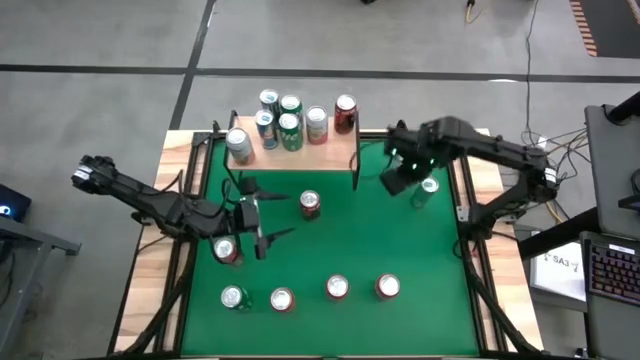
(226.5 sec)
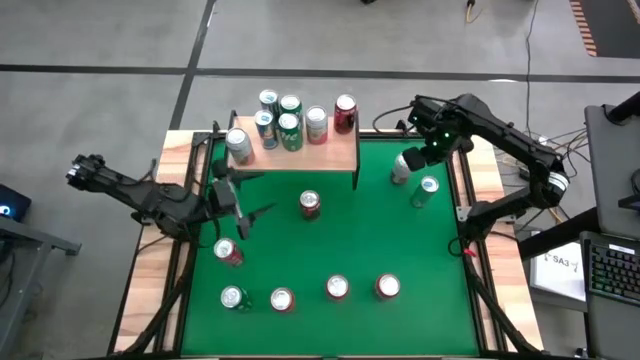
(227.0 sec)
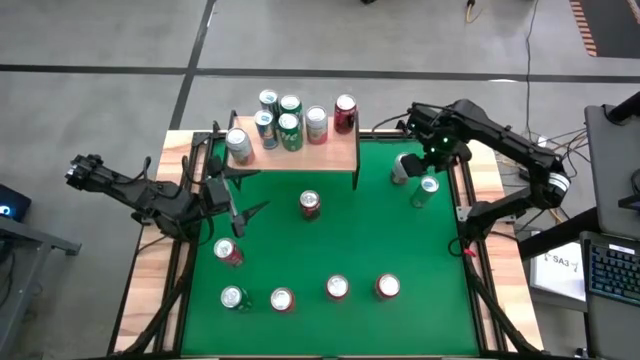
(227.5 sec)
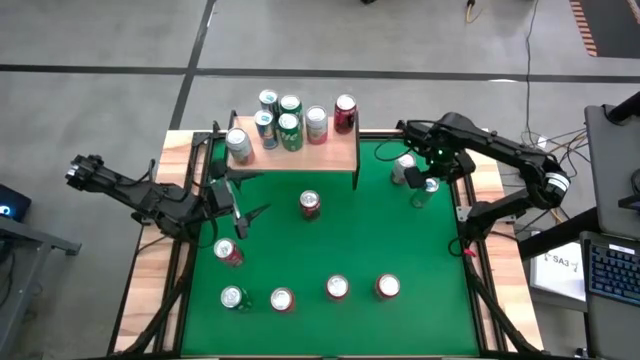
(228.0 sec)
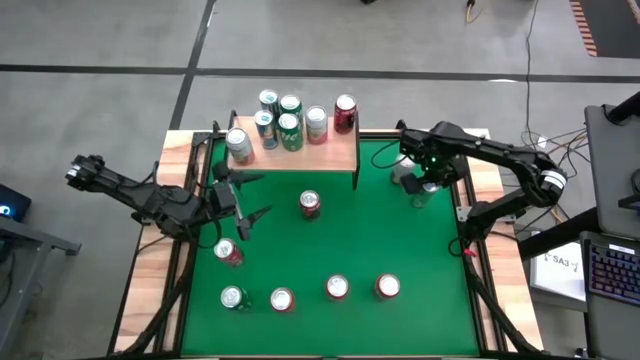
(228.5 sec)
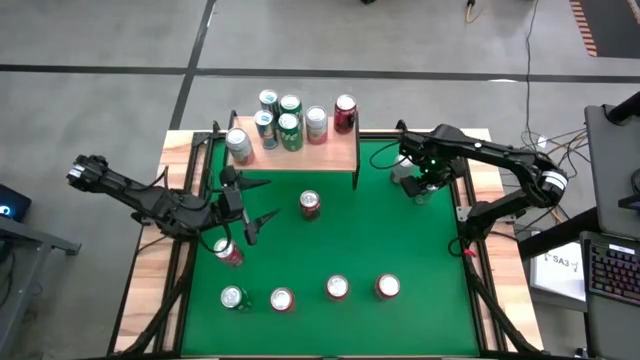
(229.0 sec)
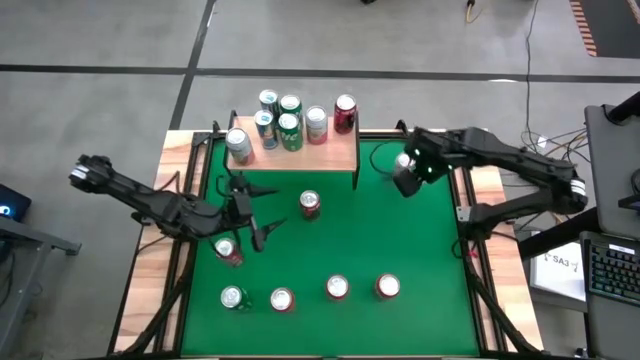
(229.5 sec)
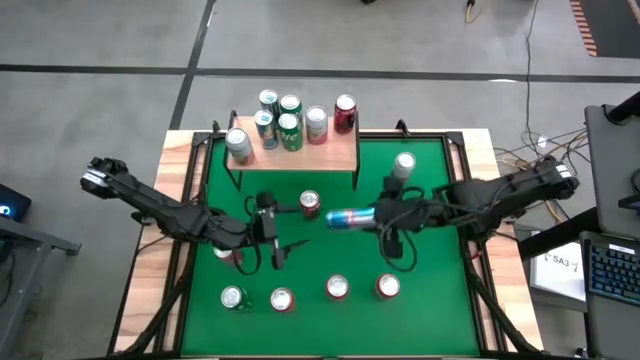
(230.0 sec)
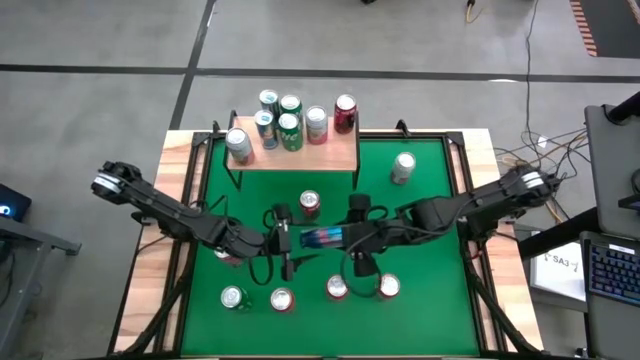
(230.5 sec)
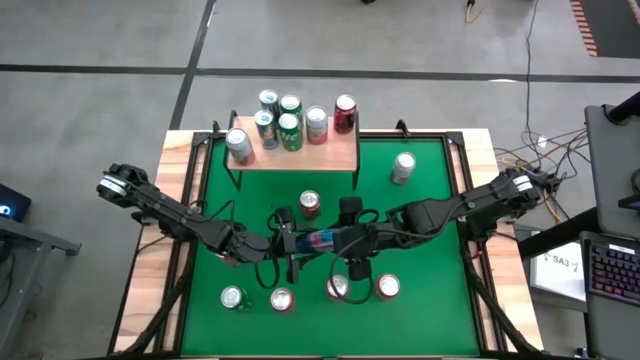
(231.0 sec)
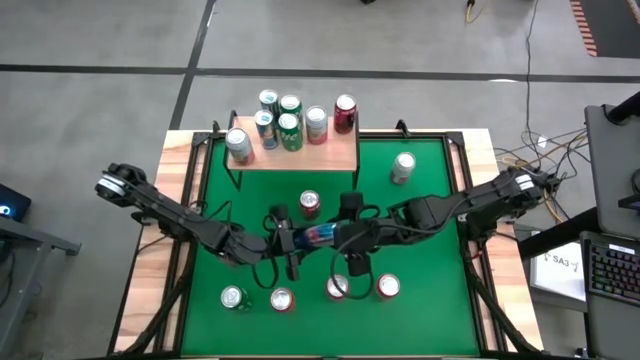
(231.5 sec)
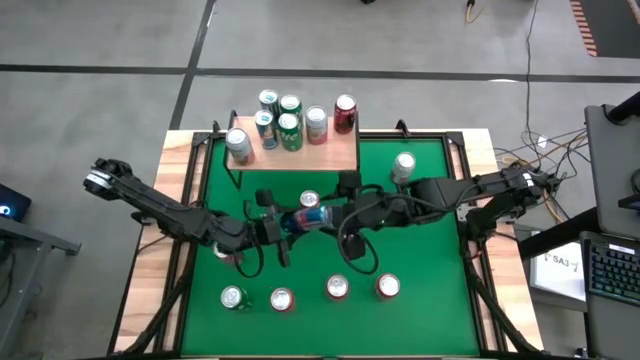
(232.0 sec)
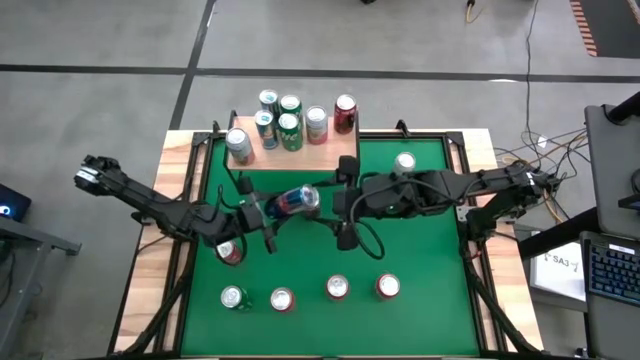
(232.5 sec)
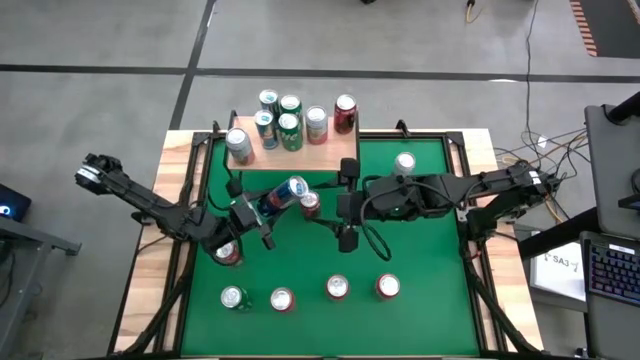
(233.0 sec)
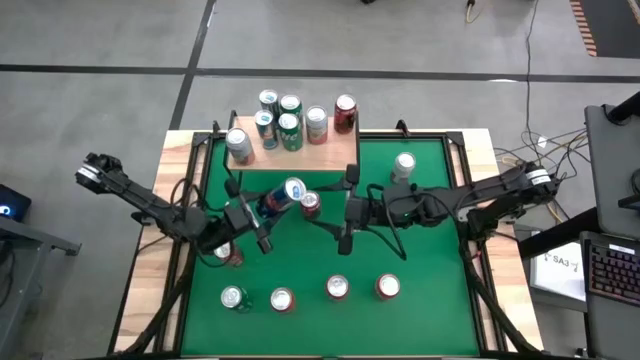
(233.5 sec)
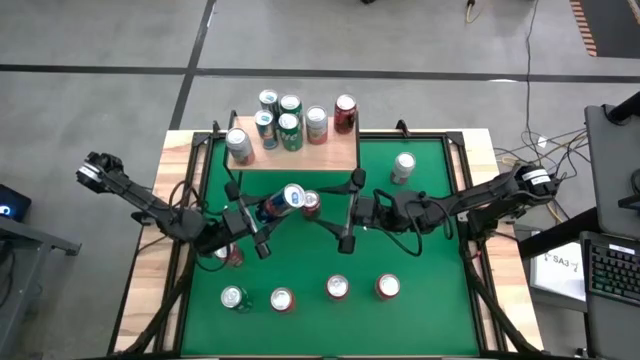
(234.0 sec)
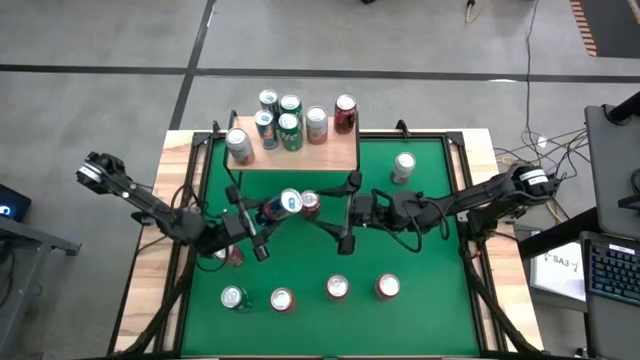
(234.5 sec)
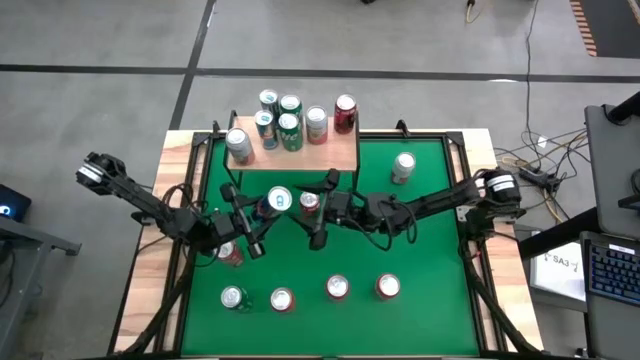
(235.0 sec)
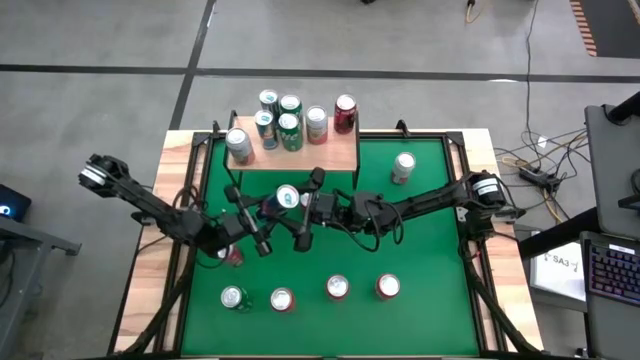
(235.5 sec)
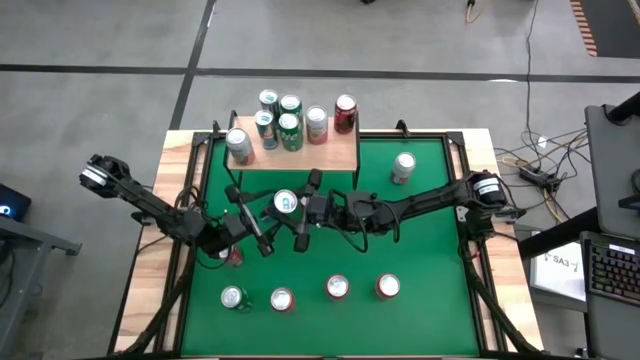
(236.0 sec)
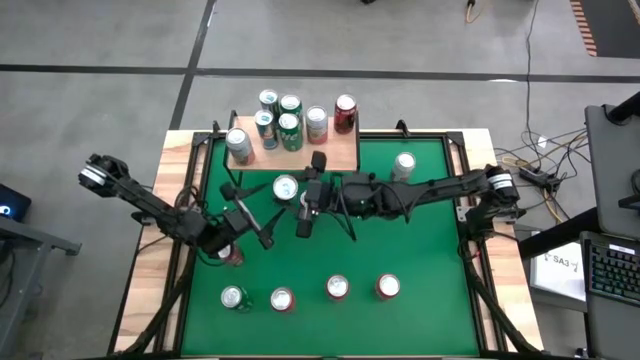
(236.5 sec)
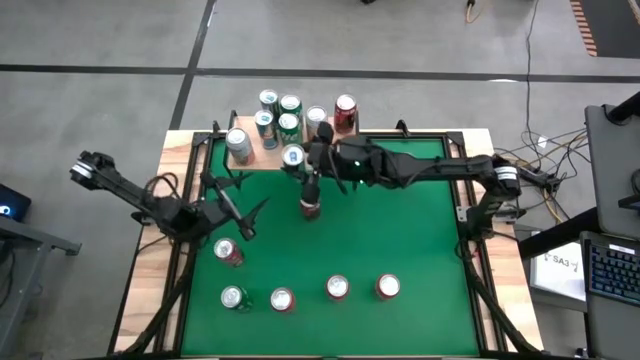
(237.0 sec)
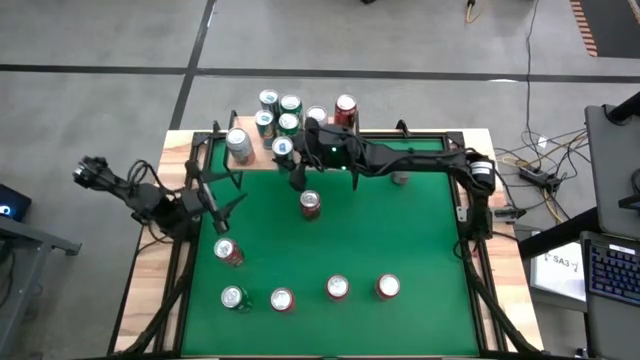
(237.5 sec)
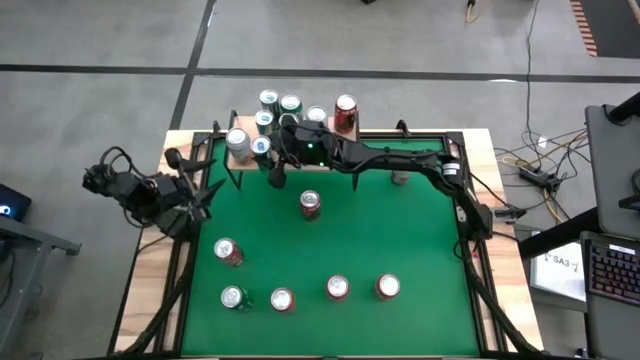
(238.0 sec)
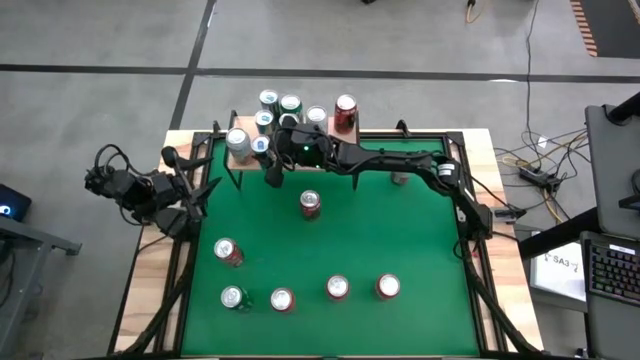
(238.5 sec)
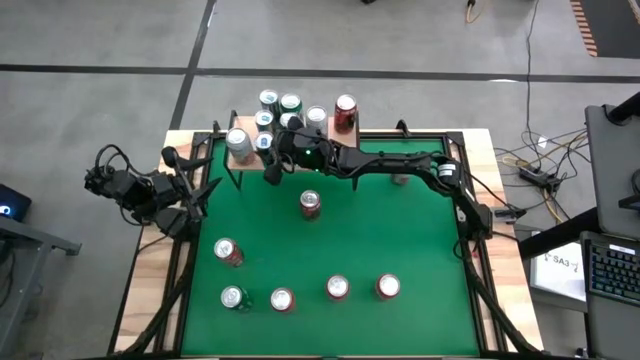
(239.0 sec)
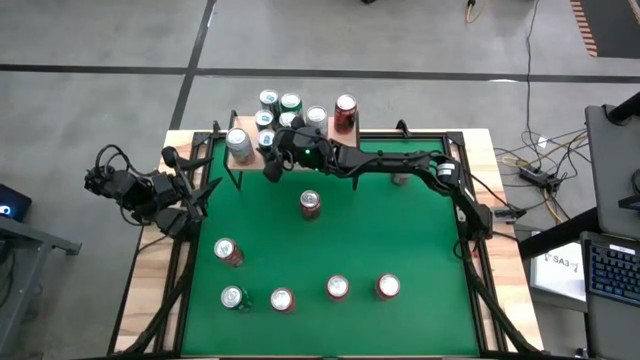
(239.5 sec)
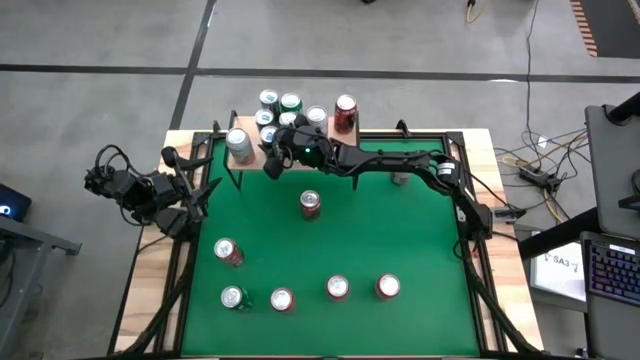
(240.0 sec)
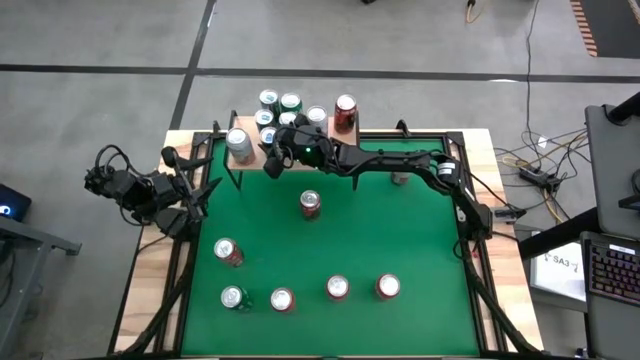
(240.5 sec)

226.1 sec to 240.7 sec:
Task: Place canned beverage on shelf
Put the blue can on the shelf

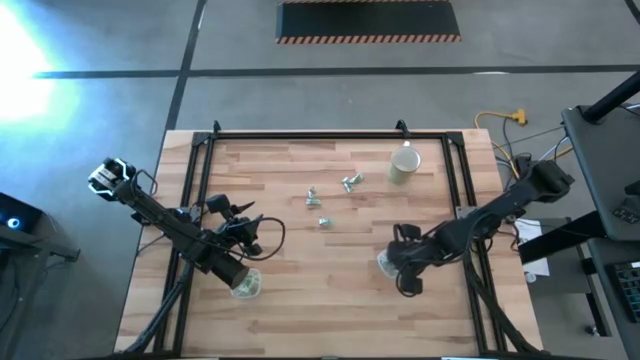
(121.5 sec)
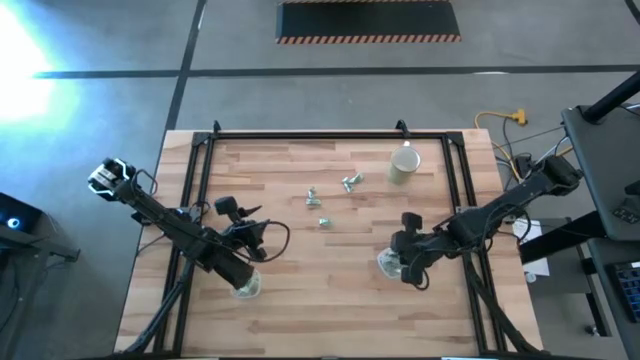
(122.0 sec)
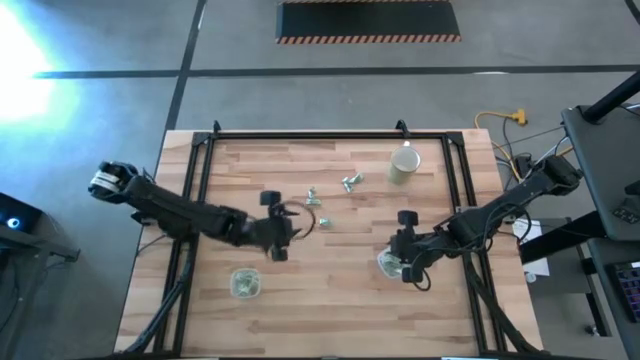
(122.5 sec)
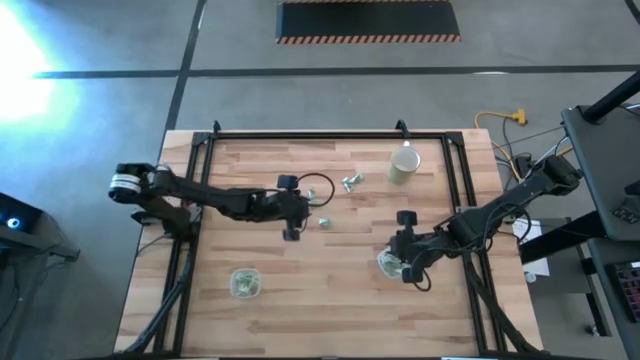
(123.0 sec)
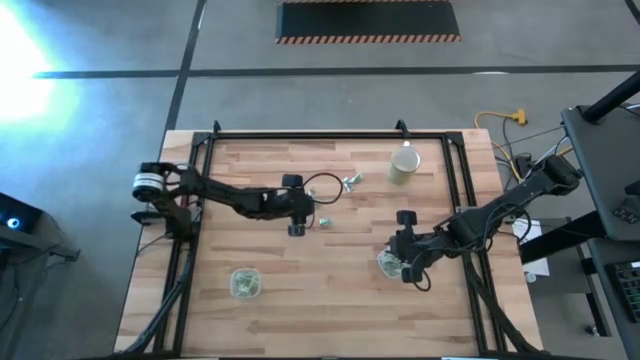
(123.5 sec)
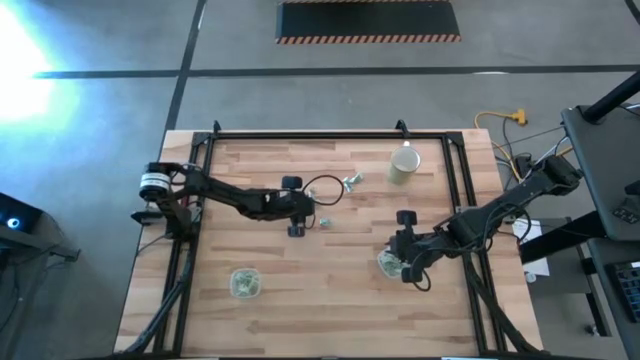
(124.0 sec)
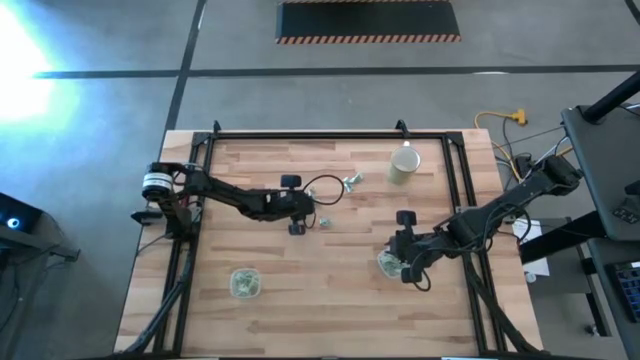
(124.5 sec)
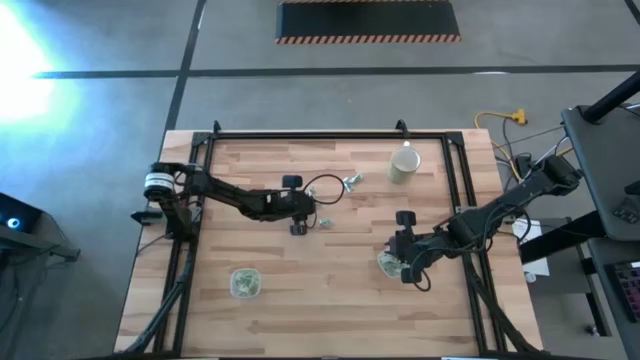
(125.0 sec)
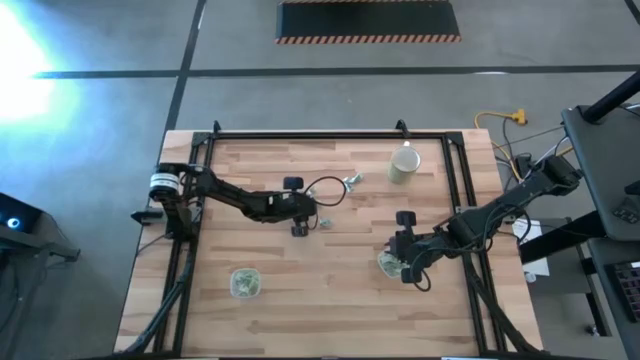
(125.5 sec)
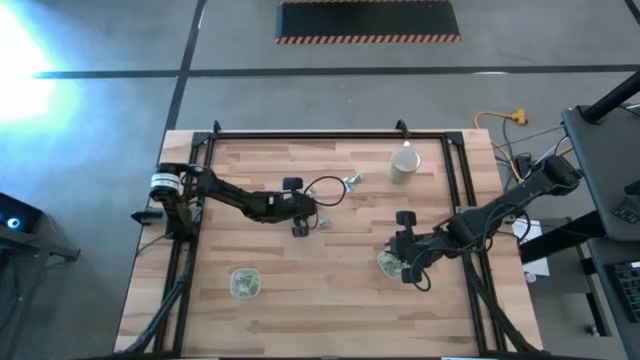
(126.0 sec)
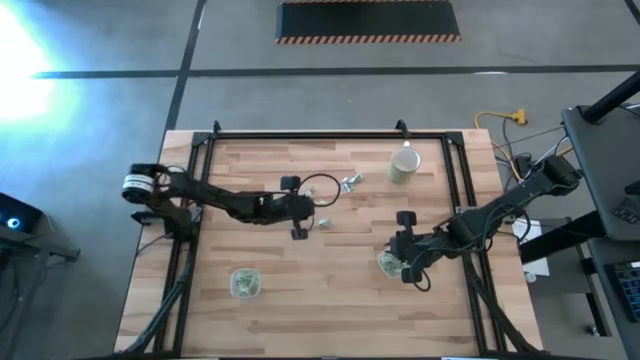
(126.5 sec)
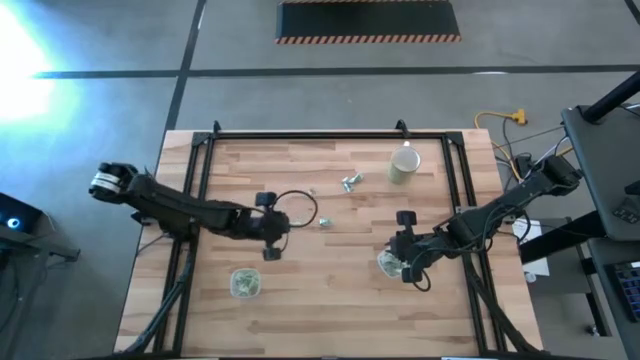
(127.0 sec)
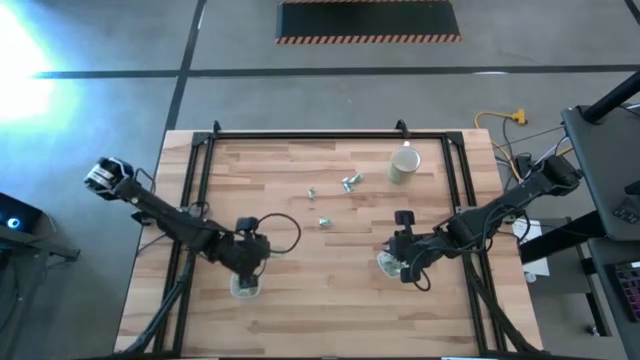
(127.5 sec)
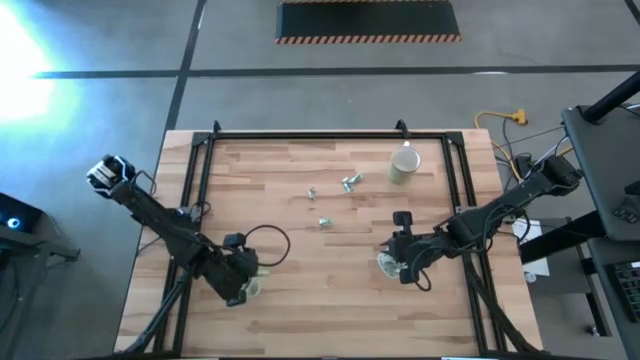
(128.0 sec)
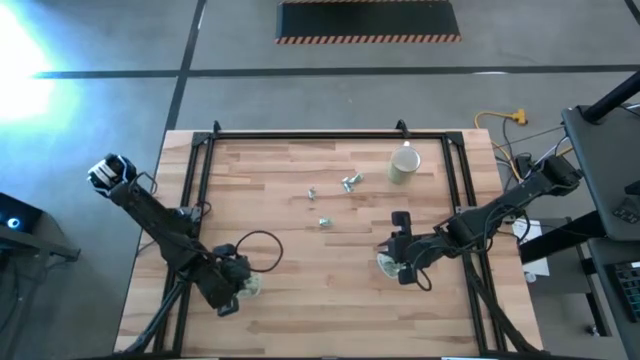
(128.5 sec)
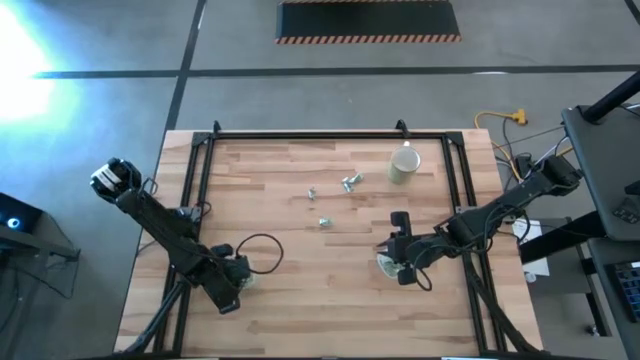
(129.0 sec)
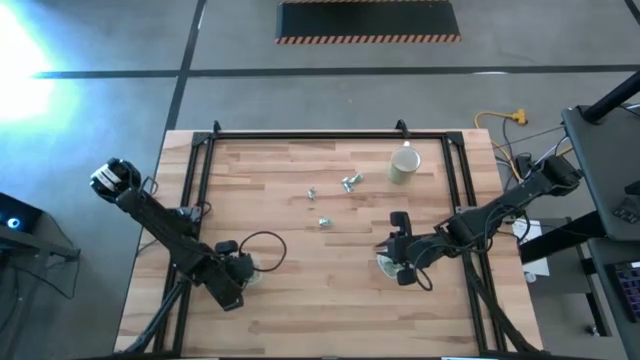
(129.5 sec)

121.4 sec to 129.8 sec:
Task: Pick and place Stevia / Truvia into bins
Put the stevia packet into the left transparent container
